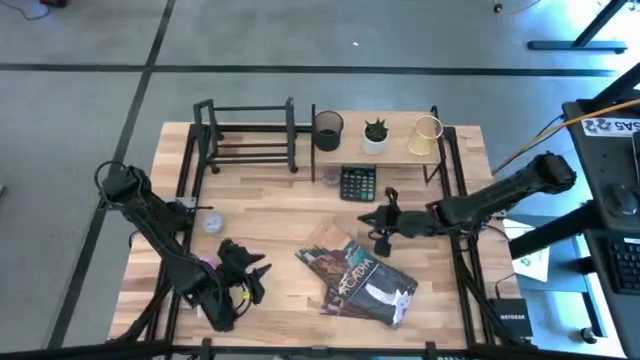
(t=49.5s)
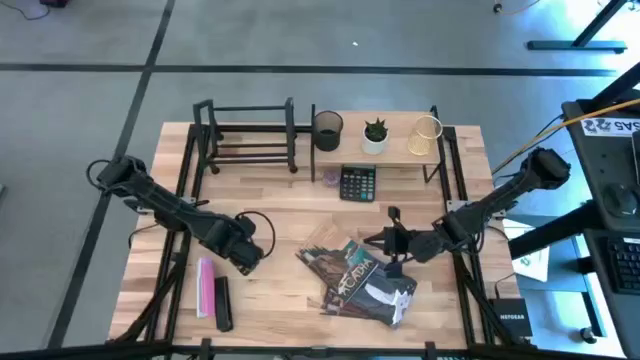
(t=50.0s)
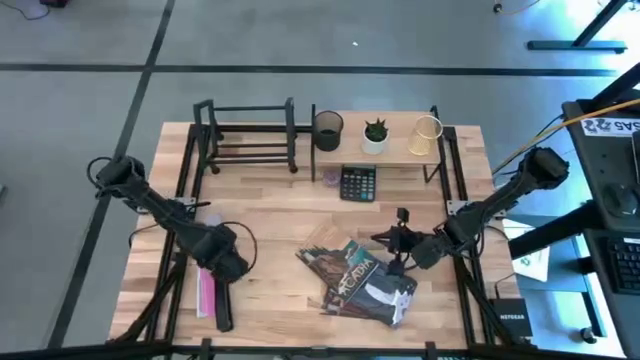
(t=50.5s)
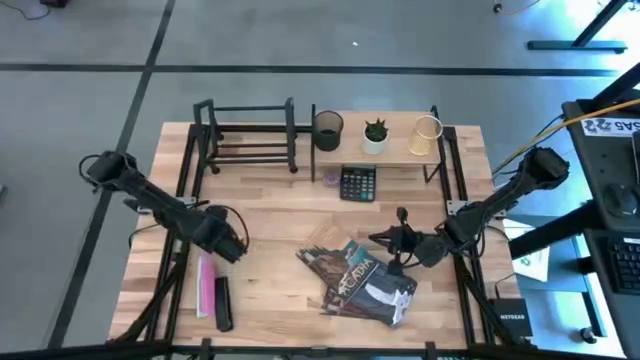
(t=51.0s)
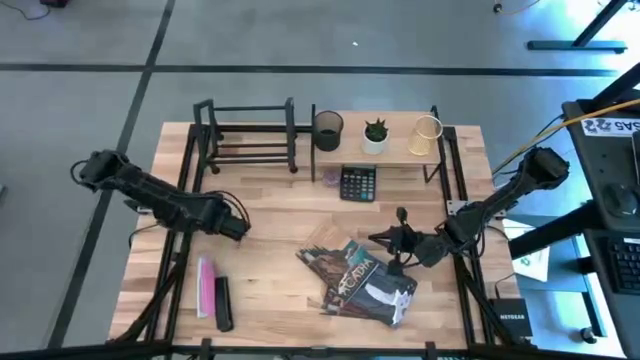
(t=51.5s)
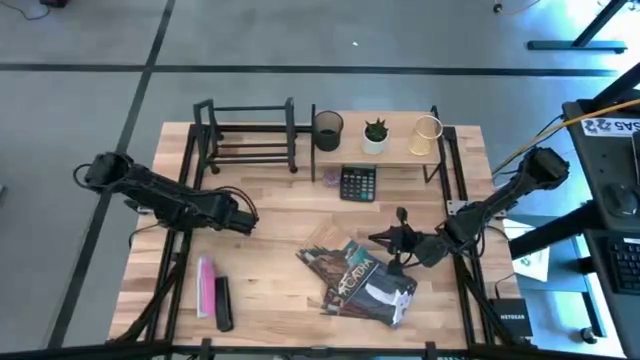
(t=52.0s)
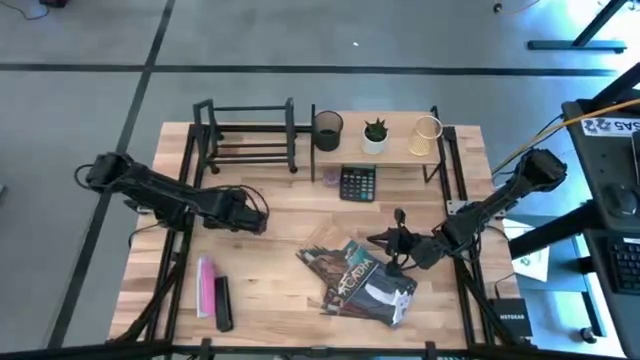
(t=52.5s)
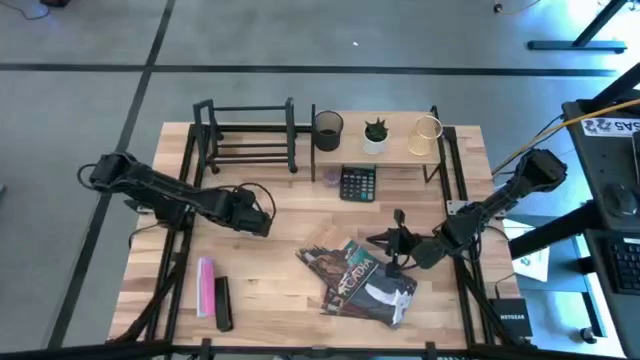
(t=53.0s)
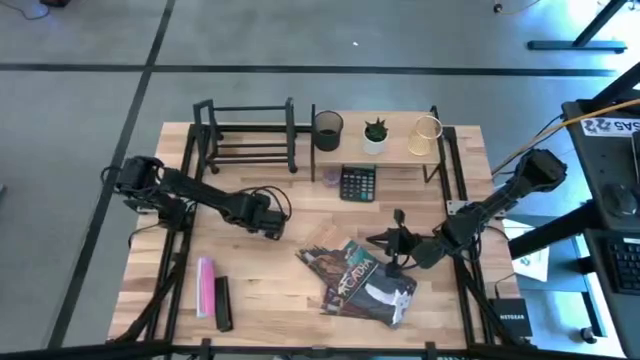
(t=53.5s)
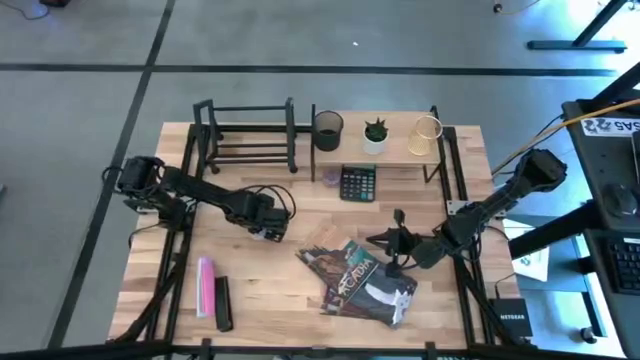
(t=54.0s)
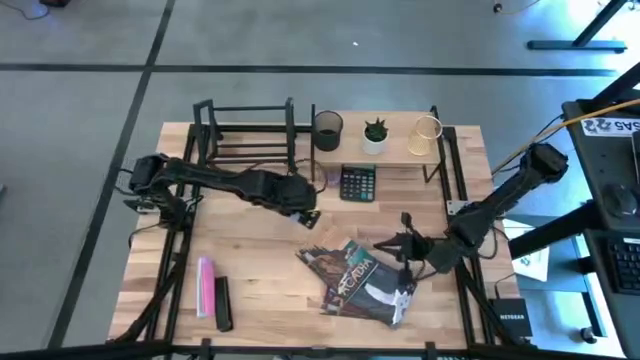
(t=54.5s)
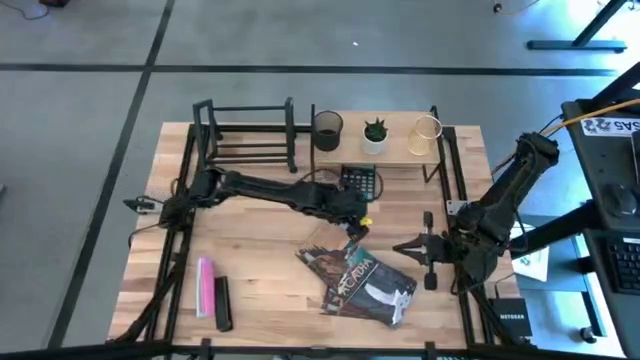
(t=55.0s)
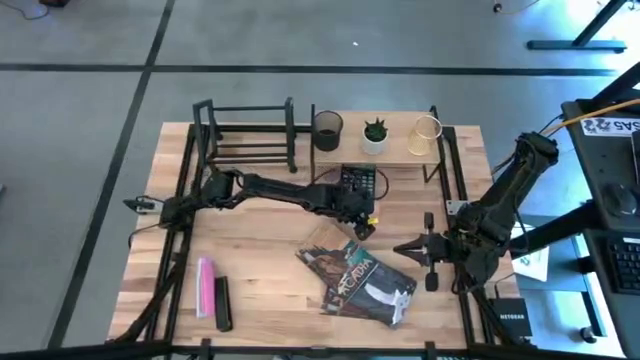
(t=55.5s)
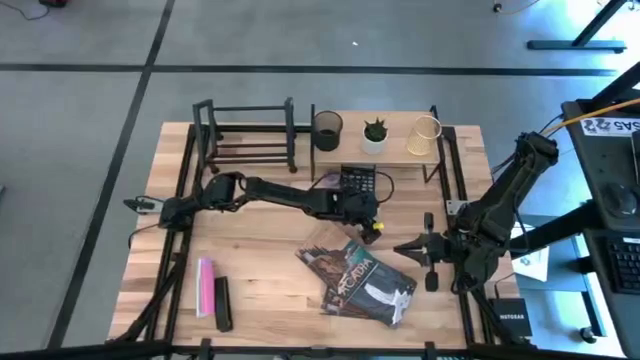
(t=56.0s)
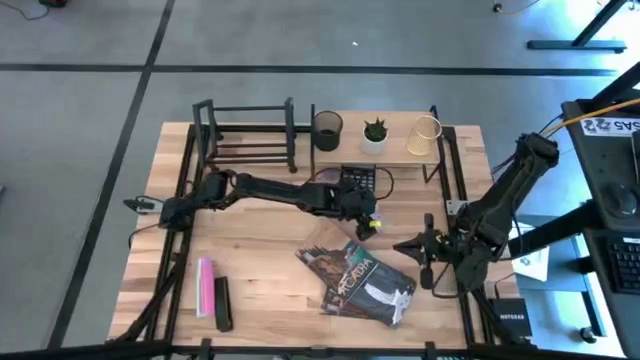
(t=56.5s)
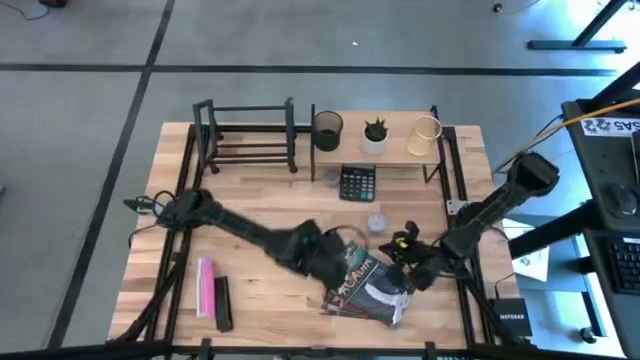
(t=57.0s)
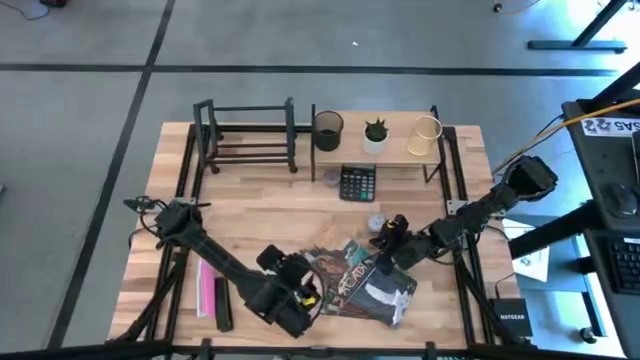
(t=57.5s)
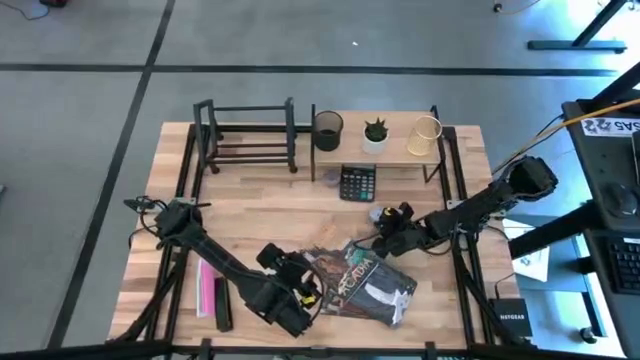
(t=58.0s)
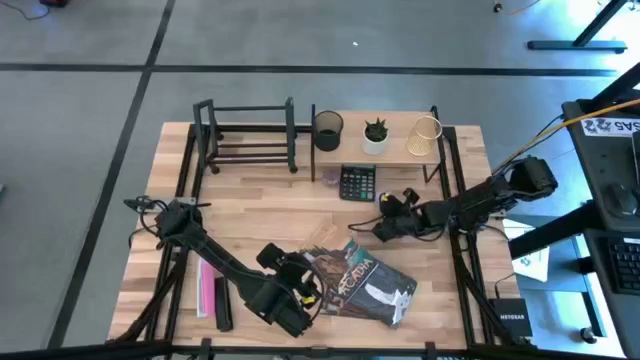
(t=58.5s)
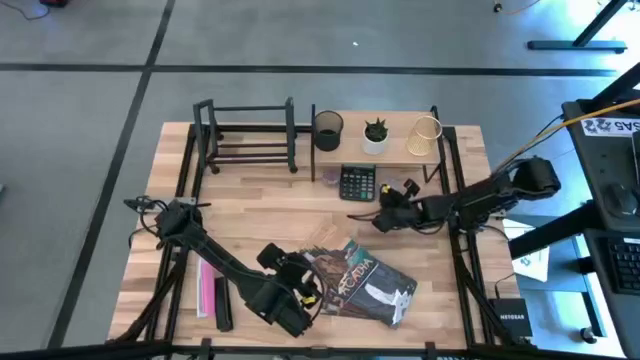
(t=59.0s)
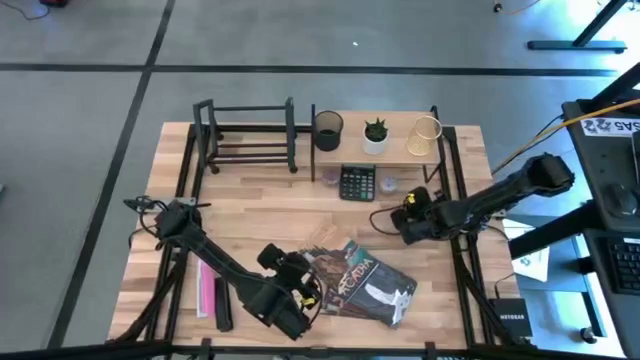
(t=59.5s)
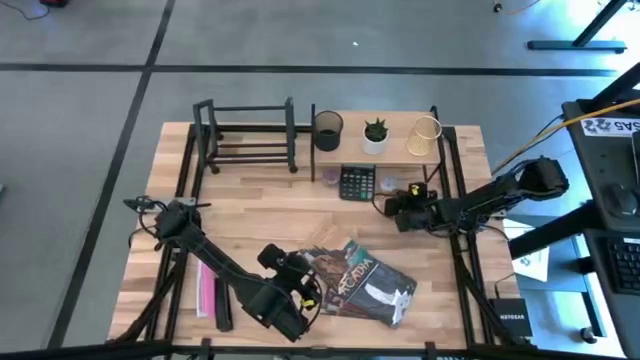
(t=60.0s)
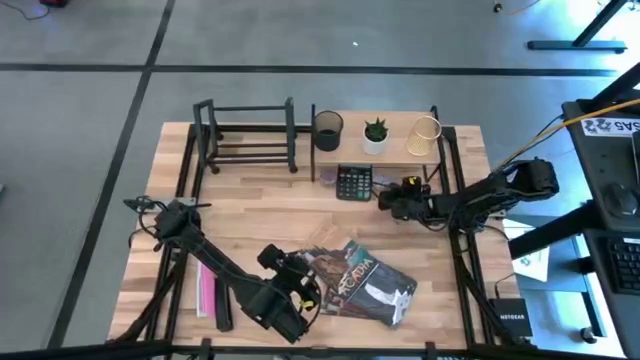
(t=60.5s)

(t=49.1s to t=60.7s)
Task: Stock shelves
Put the blue scented candle jar under the shelf

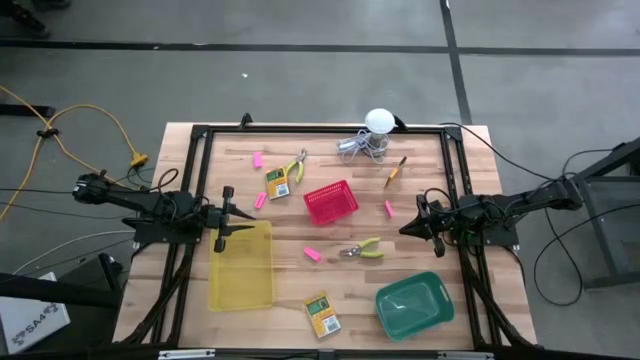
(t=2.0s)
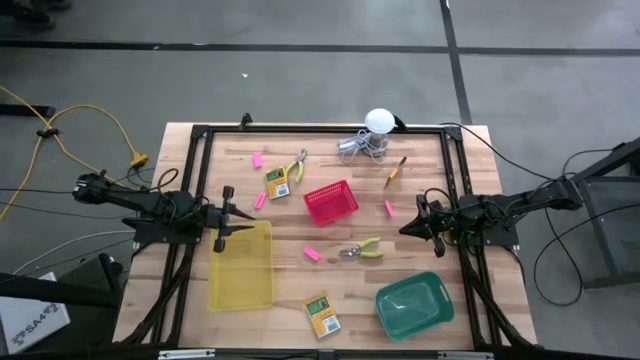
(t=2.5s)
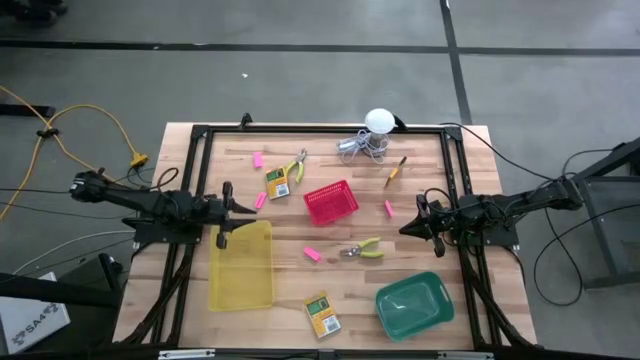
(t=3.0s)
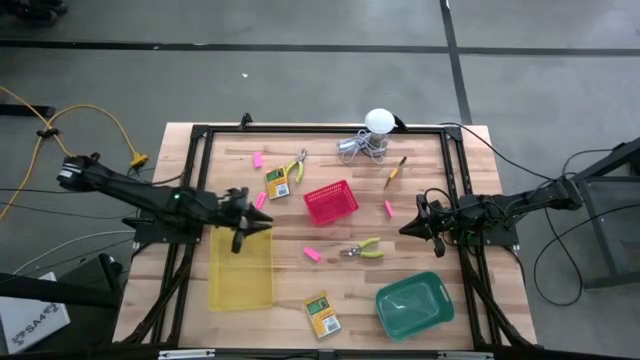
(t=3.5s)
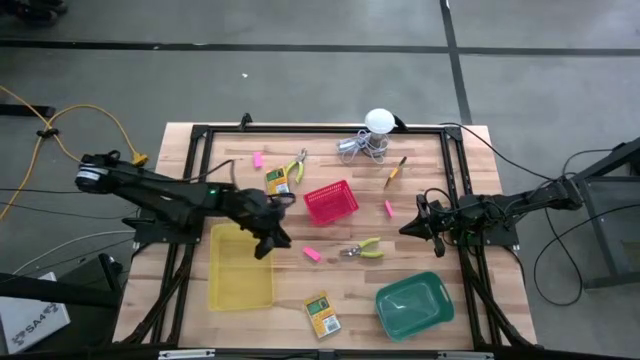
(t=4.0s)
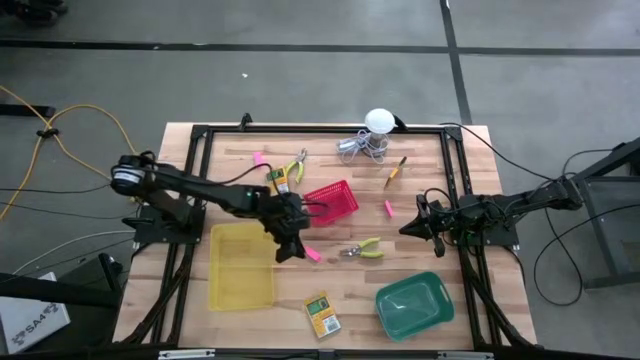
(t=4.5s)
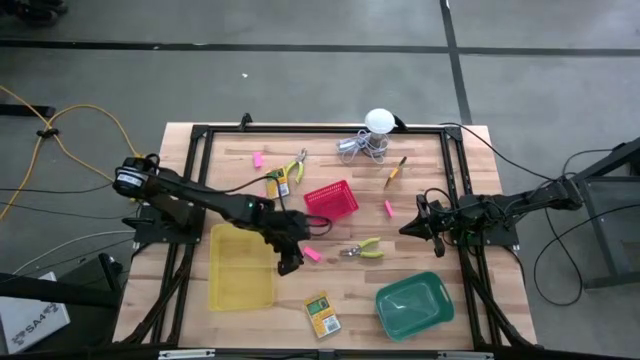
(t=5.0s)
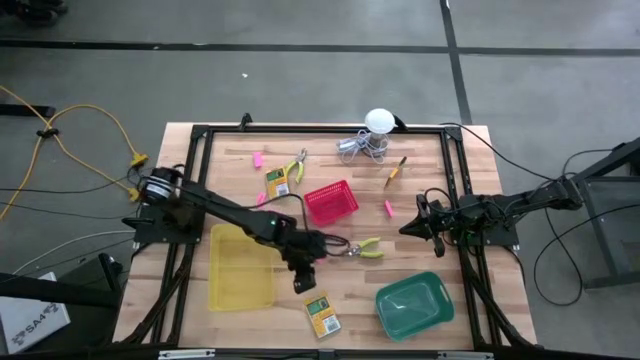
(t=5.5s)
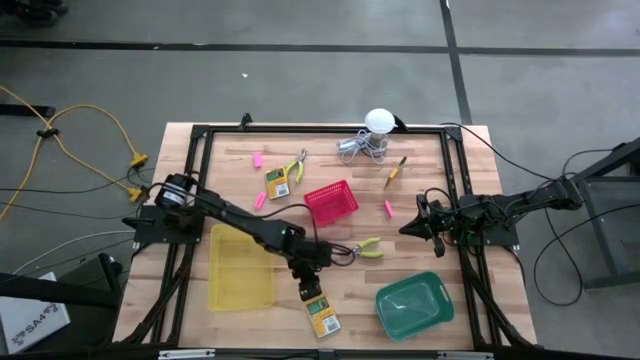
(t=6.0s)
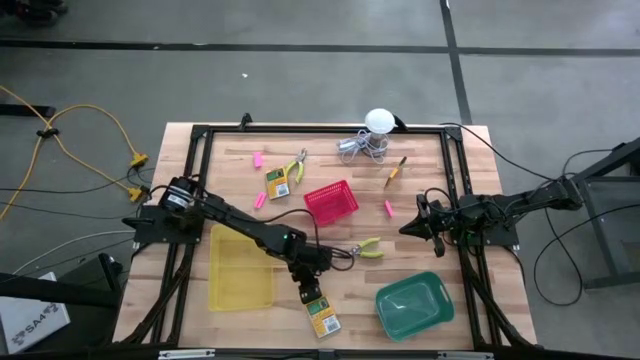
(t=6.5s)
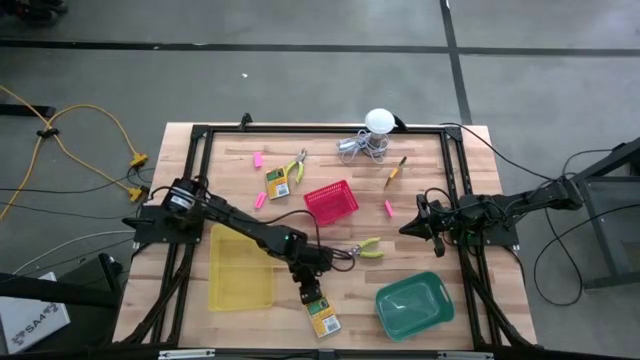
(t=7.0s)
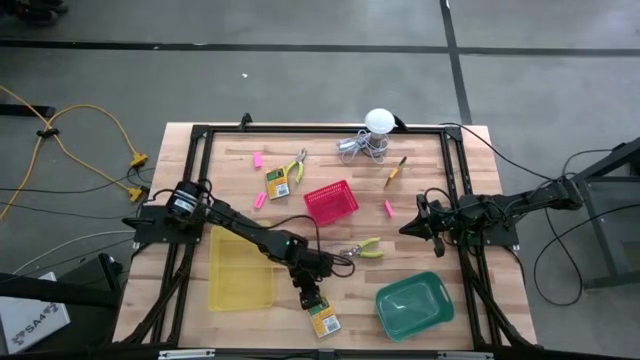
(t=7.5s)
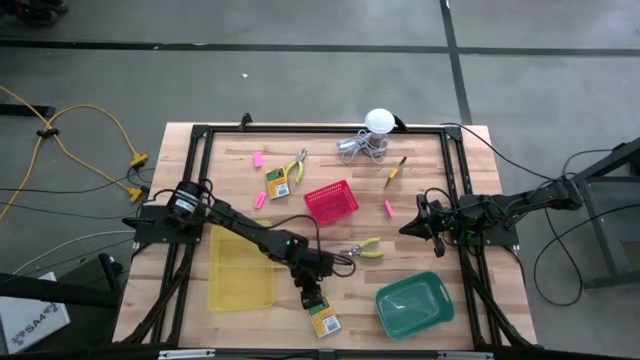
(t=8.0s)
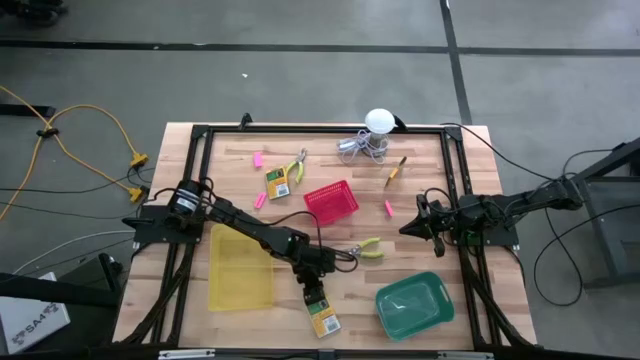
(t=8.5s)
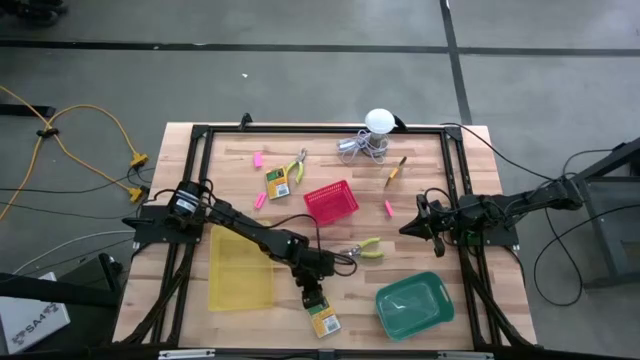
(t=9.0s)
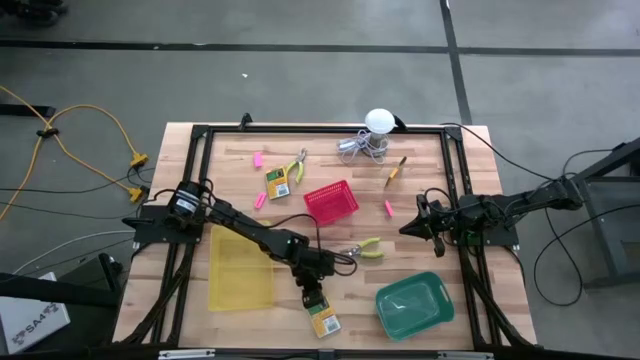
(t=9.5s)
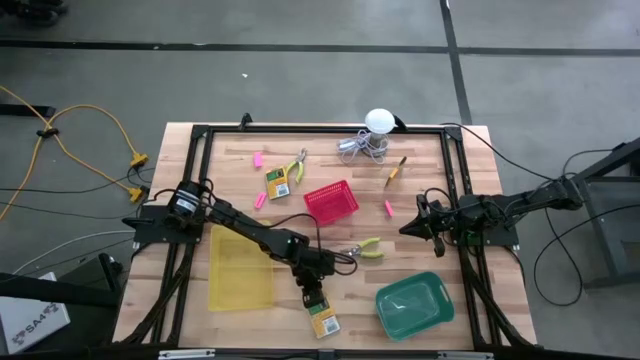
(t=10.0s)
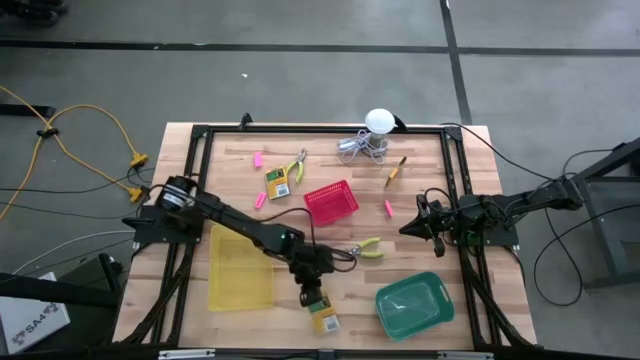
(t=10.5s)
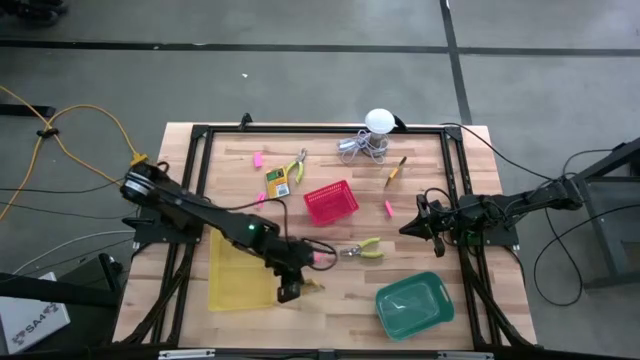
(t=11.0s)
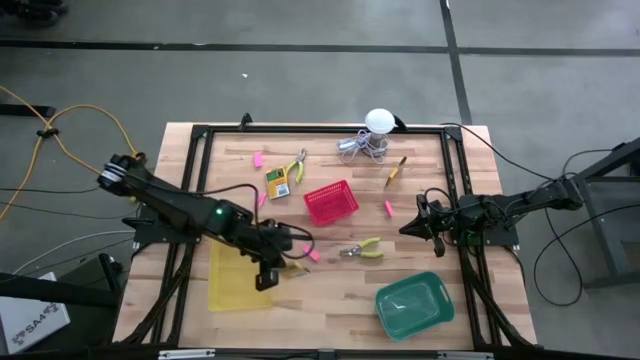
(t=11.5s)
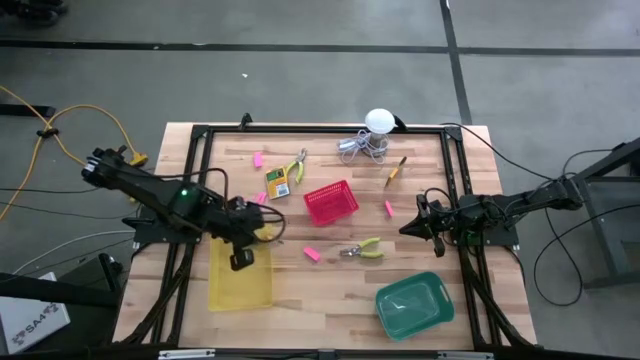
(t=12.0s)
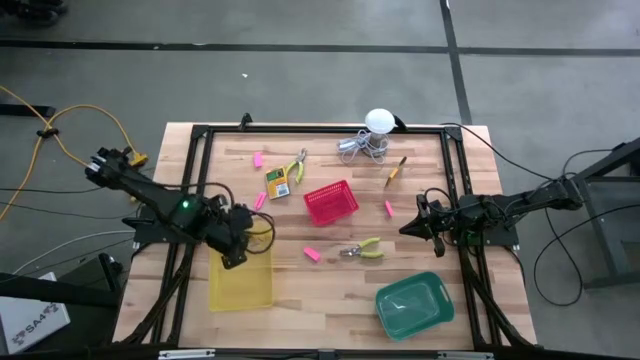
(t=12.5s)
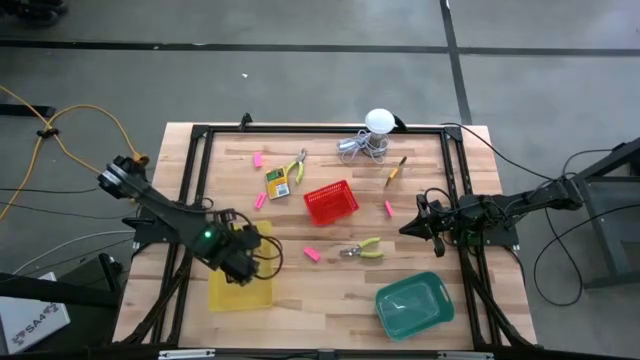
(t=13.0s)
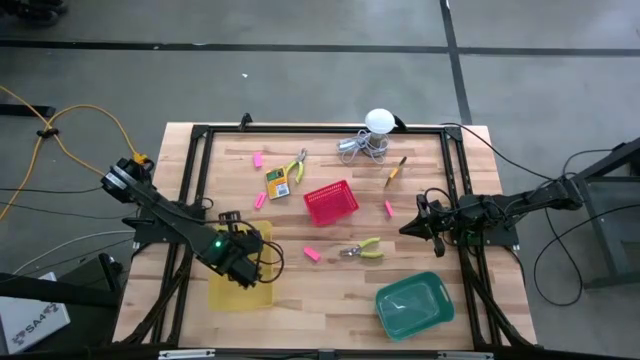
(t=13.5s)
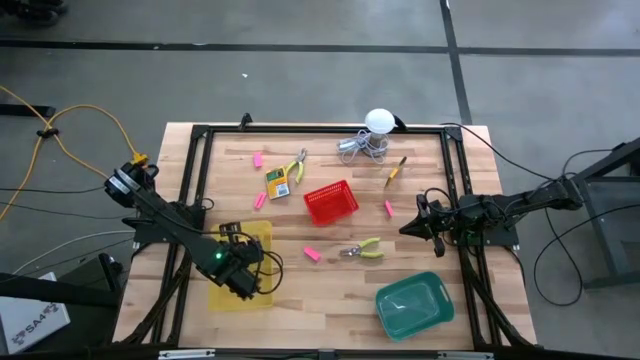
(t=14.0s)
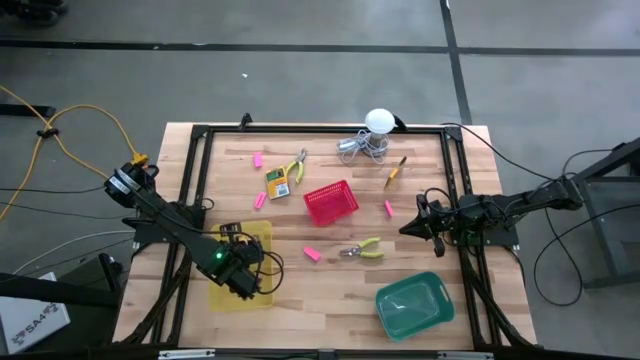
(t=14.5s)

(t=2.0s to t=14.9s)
Task: Pick & Place School Supplies
Put the yellow box of crayons into the yellow bin
